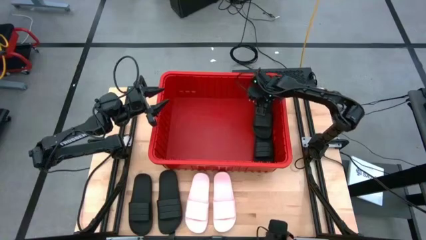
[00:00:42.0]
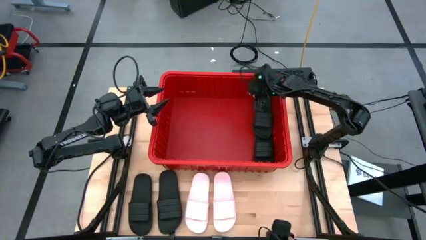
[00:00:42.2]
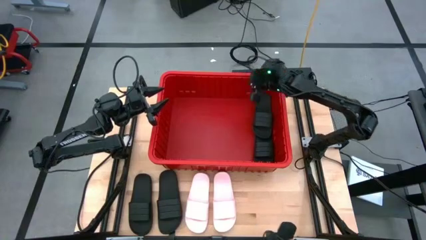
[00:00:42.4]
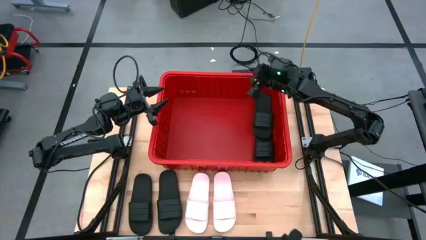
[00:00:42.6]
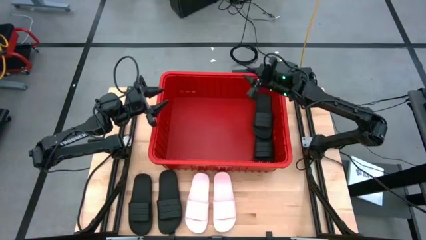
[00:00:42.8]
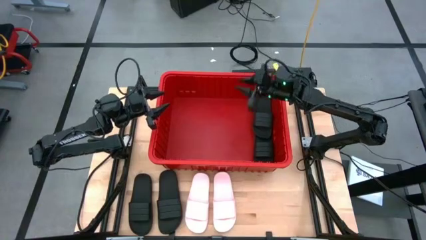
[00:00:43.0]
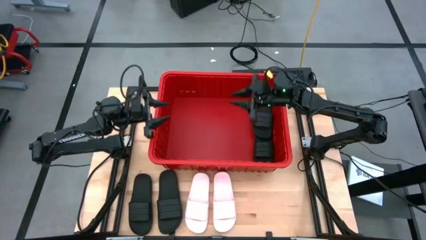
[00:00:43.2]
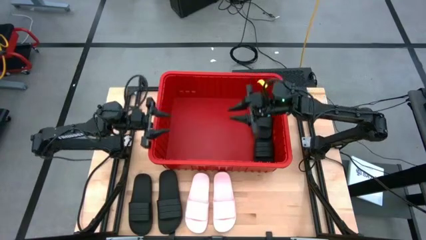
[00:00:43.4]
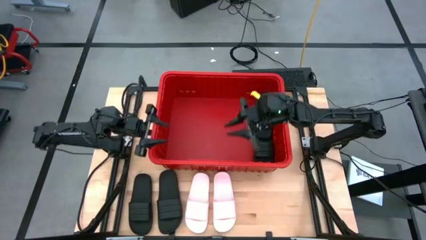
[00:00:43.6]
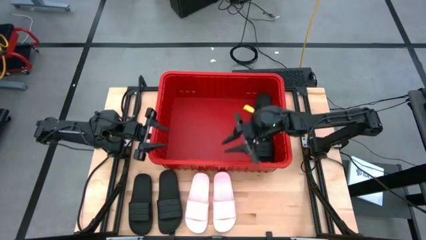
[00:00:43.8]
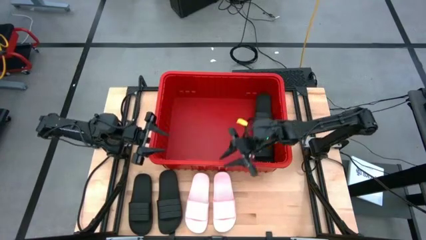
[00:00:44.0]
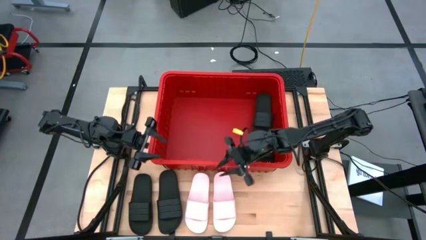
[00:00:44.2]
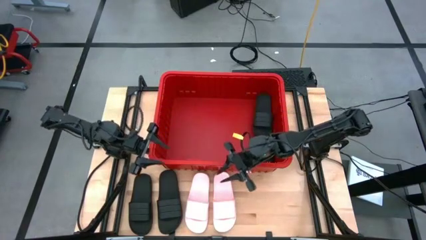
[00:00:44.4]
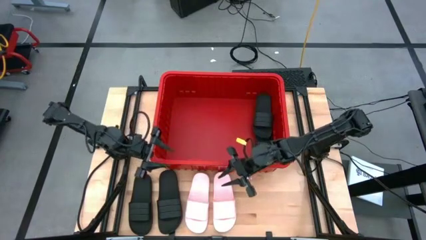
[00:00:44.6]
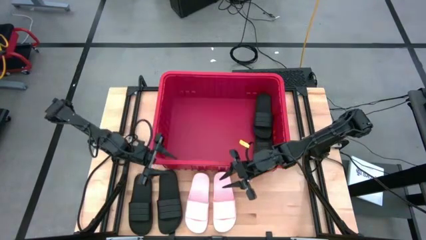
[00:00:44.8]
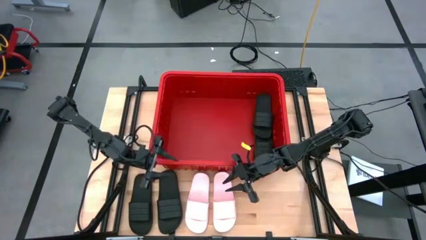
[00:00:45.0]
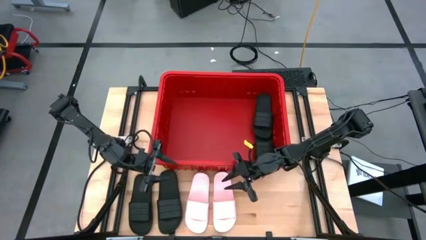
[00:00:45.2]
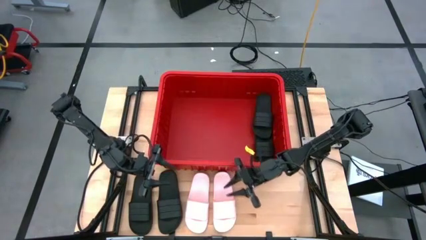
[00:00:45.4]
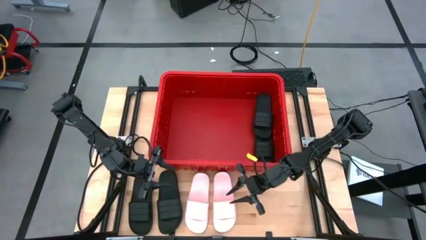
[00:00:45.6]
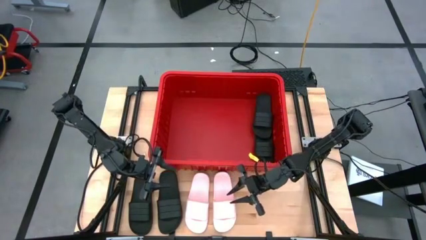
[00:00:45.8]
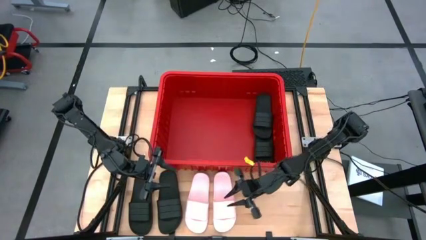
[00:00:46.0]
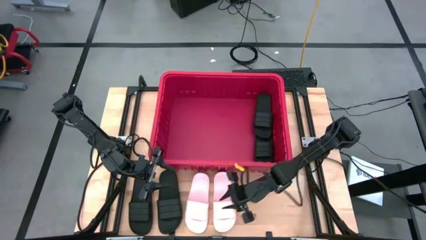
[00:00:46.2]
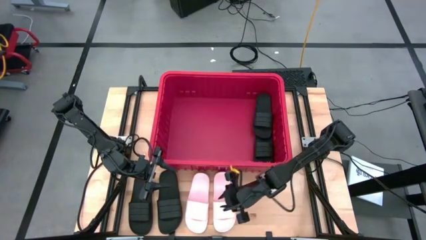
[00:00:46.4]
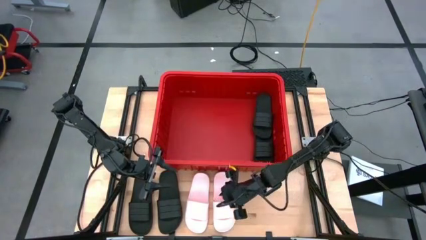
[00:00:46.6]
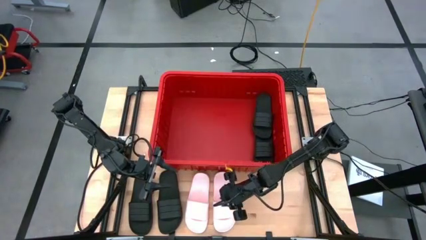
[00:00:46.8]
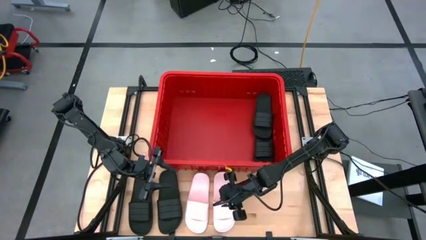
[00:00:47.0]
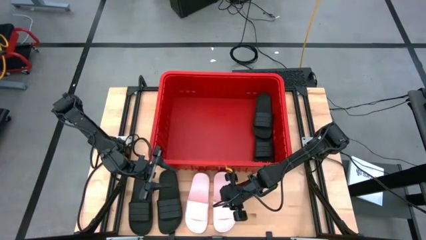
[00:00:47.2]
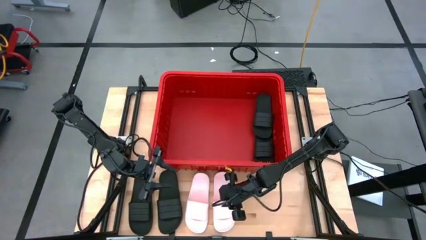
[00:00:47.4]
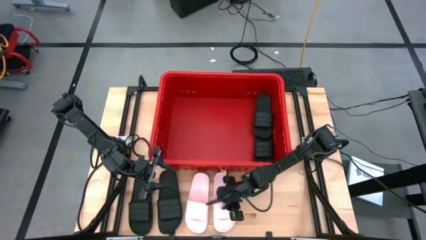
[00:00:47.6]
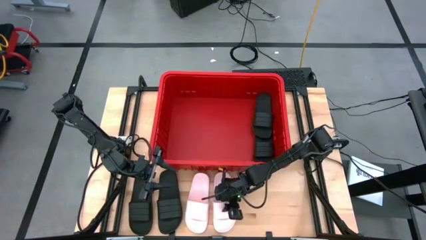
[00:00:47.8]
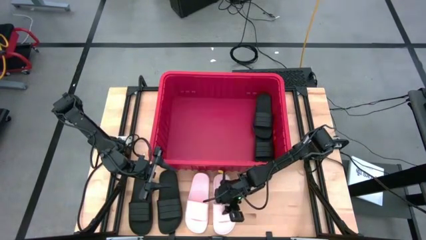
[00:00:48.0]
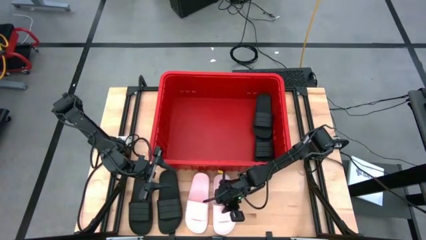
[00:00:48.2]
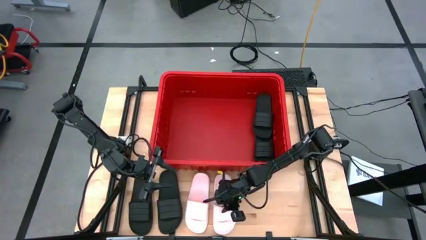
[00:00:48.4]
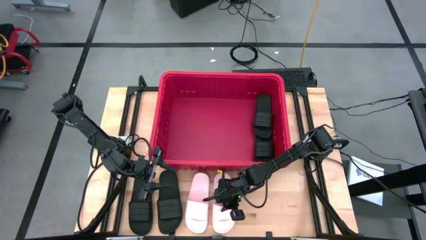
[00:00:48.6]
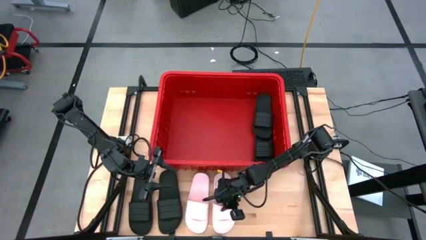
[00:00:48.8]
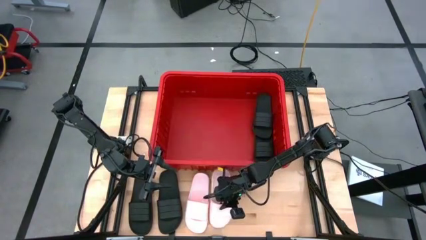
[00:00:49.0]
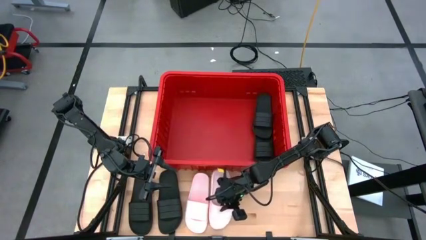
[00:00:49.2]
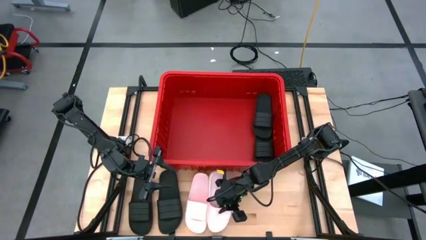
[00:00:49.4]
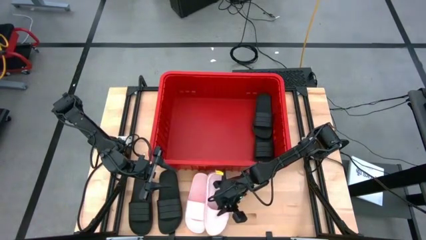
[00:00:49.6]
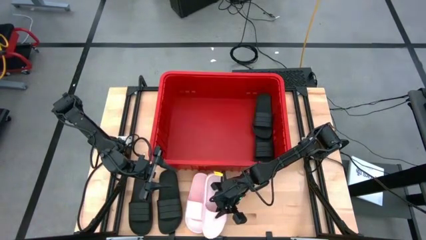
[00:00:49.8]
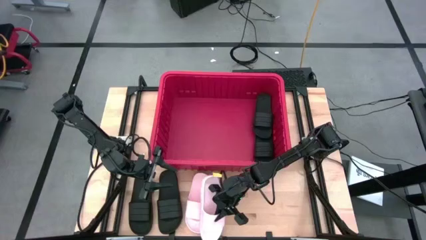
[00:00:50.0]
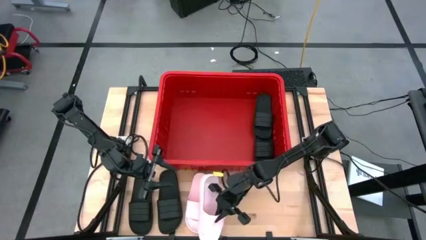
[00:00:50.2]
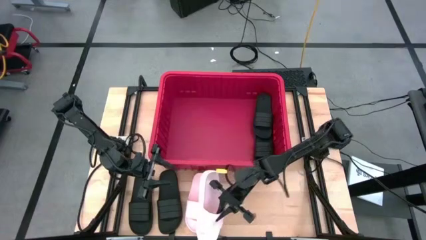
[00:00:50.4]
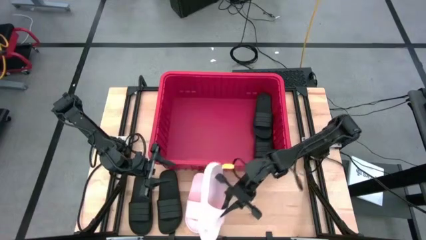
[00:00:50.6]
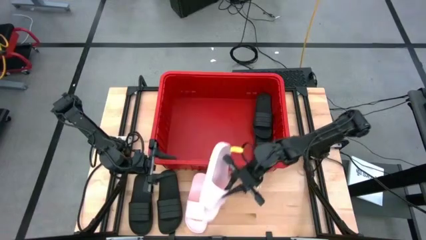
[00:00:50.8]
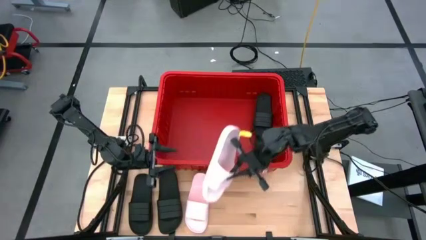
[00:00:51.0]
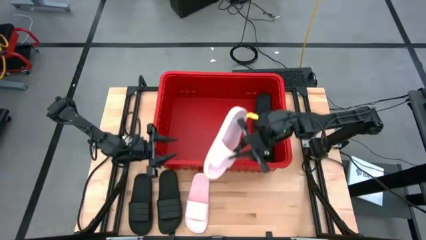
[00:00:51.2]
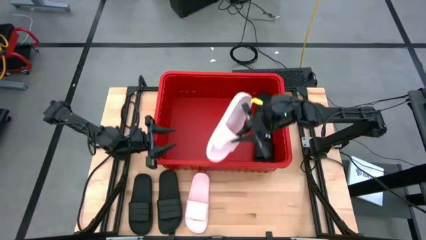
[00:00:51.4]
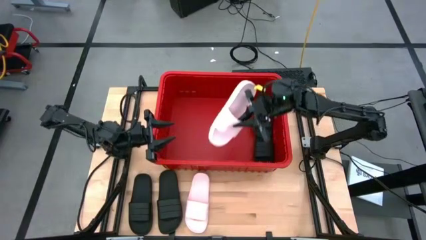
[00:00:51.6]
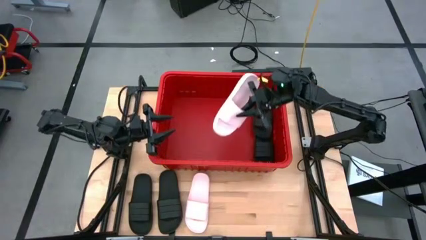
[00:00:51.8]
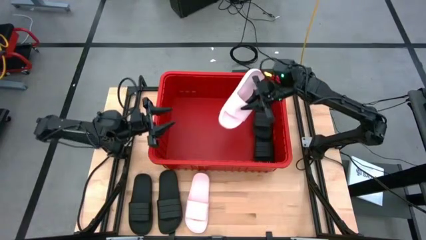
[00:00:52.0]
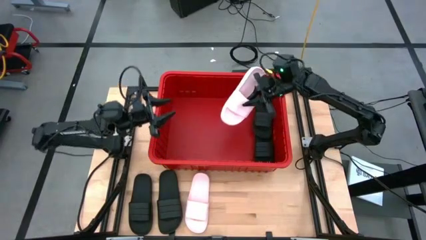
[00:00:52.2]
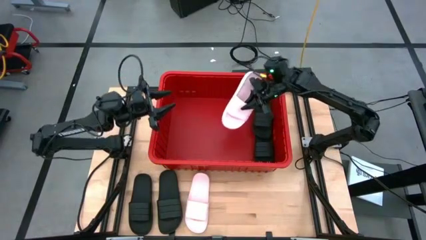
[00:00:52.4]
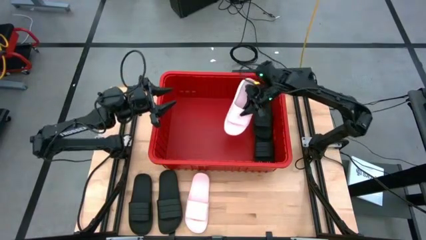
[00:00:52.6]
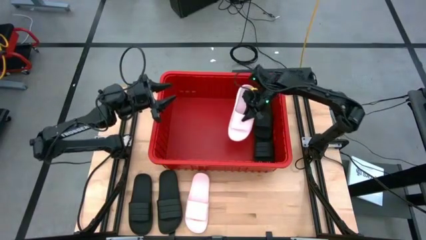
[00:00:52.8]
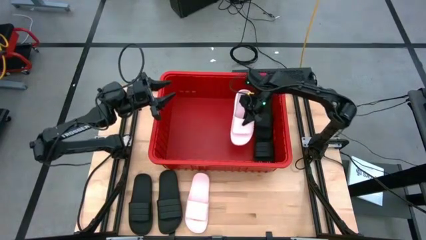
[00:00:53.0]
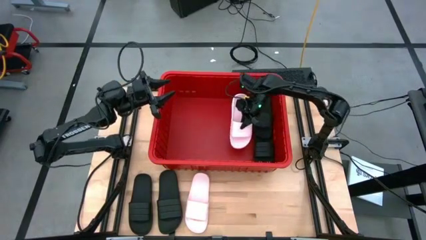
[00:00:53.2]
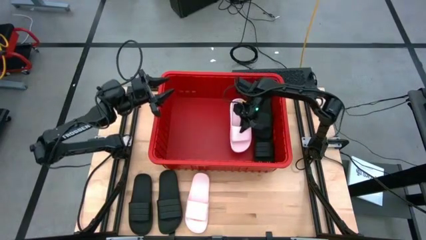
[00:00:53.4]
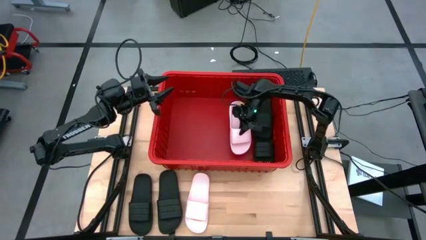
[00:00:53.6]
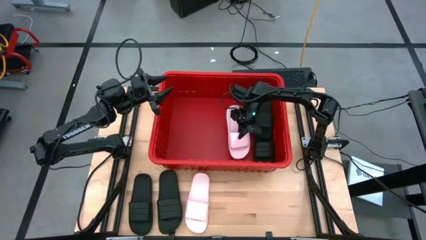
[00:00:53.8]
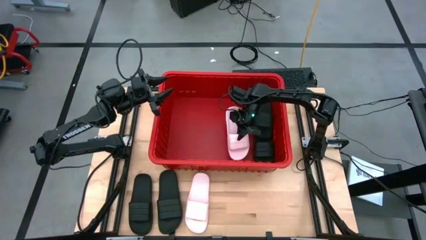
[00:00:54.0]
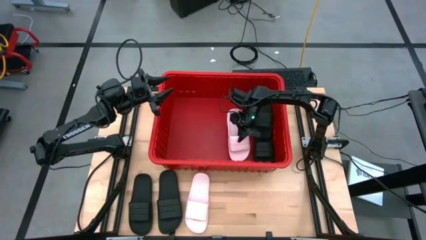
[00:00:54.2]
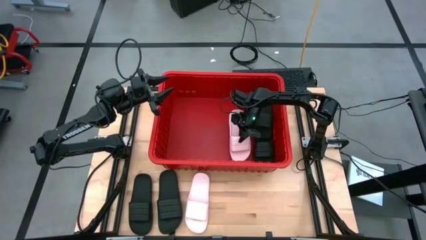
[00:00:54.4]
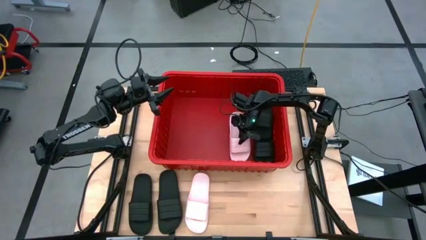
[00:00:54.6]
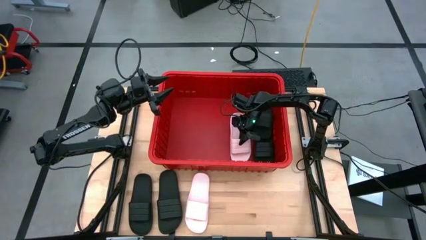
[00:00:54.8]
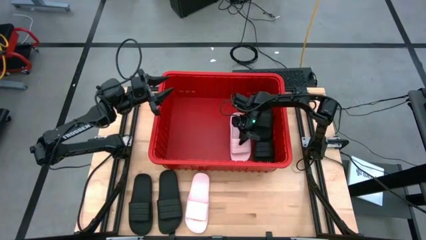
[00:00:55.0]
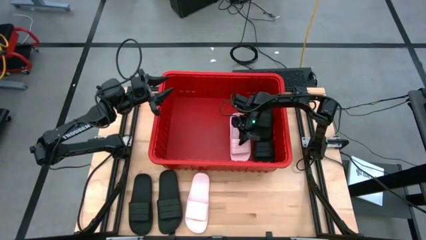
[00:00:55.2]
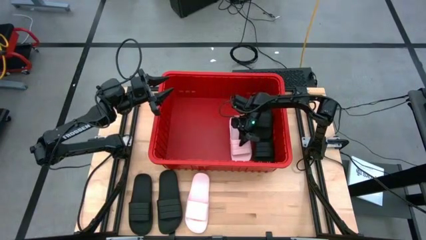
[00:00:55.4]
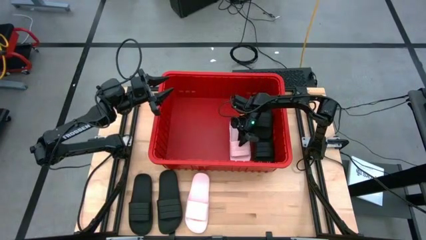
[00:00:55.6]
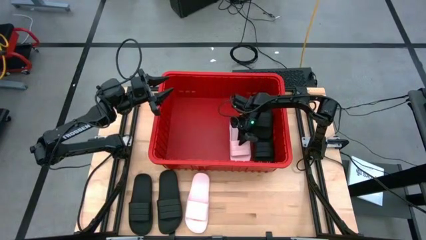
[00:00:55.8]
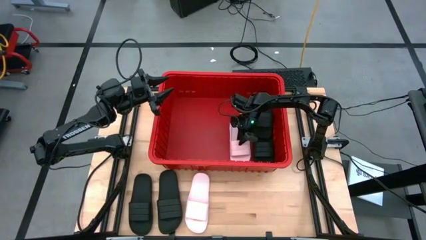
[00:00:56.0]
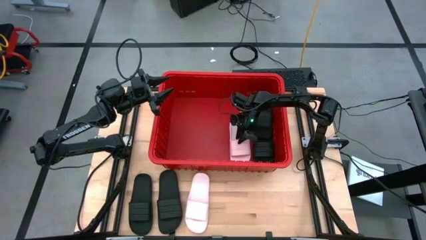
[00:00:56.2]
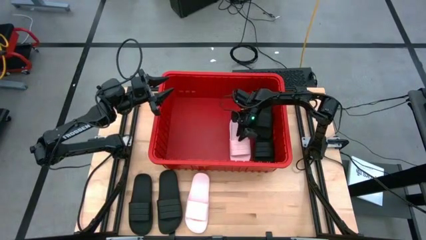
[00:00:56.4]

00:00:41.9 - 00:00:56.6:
Task: Pick and place slides into bin
Put the pink slide into the red container

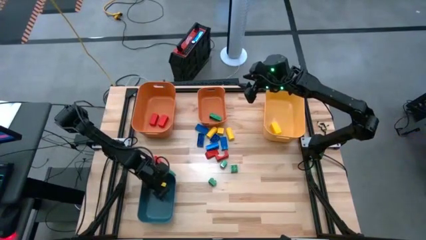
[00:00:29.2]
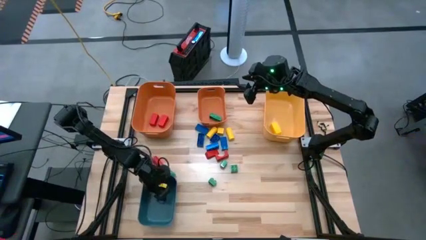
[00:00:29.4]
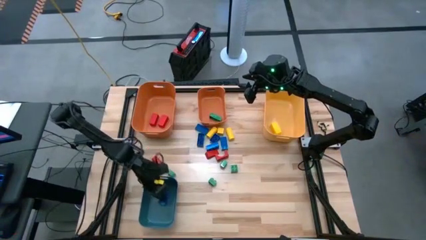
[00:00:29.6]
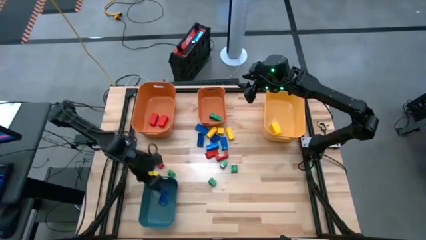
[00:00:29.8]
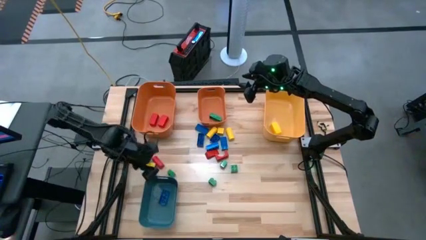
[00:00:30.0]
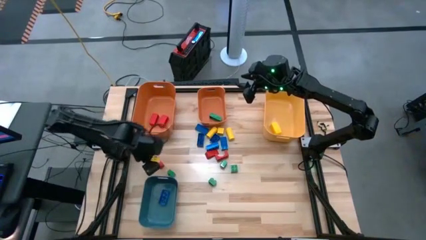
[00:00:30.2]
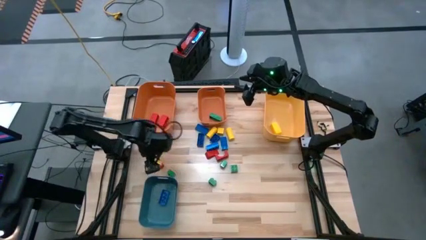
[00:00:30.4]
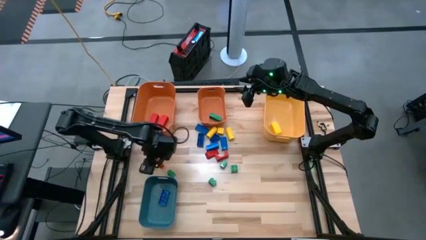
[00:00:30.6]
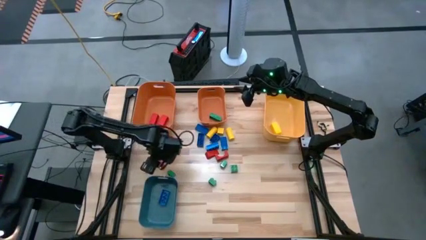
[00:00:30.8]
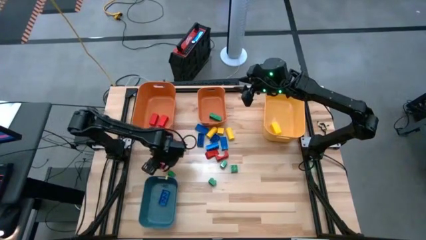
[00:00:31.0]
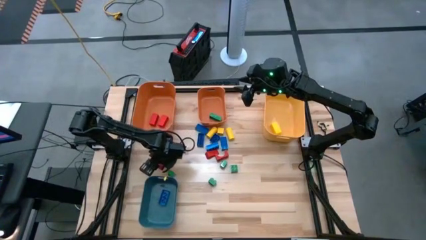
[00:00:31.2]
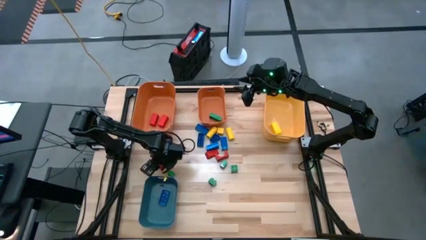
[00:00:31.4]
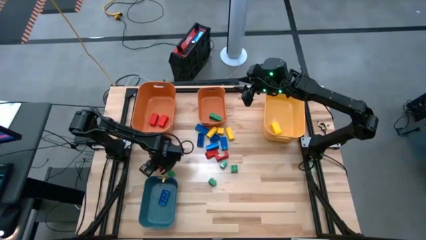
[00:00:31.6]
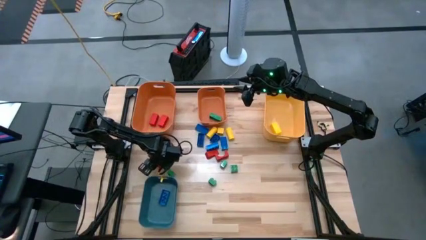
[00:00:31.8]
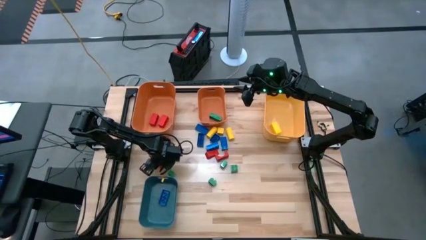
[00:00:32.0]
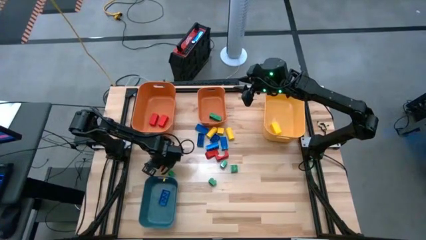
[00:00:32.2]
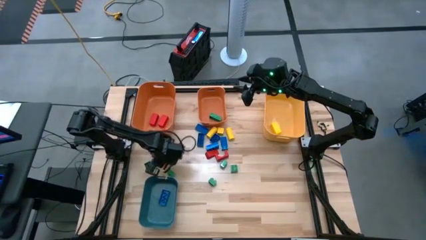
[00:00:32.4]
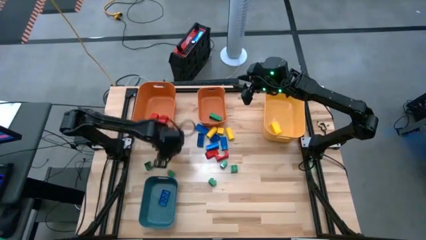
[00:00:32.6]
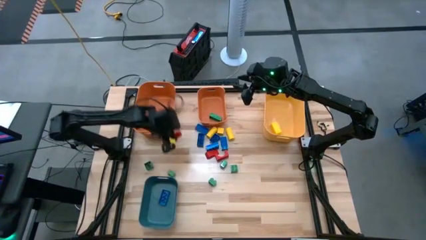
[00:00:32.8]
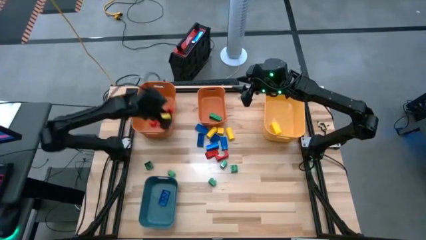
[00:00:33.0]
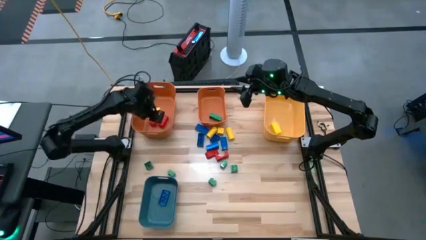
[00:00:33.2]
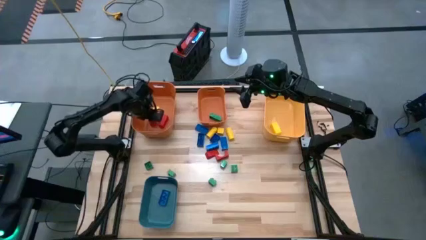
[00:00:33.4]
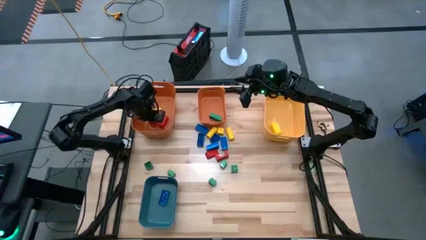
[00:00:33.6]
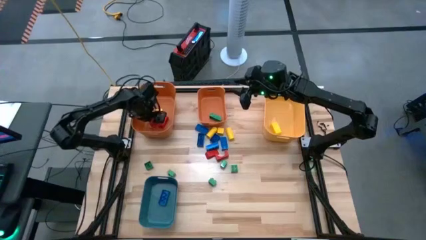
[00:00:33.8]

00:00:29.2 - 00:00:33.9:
Task: Sort blocks
Put the red block into the left orange bin
